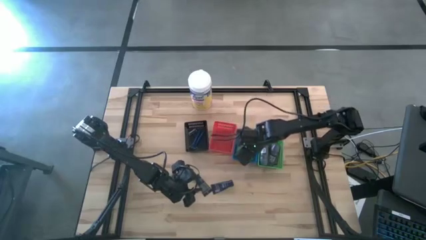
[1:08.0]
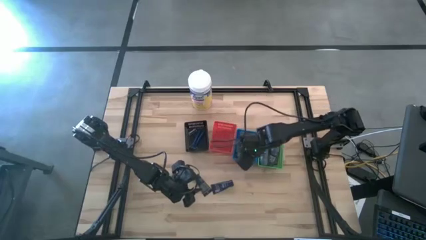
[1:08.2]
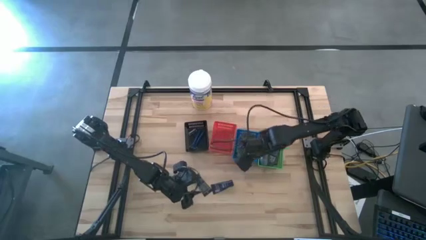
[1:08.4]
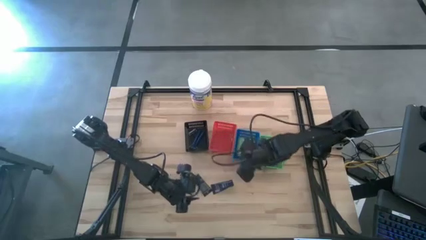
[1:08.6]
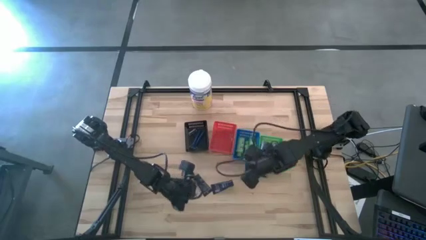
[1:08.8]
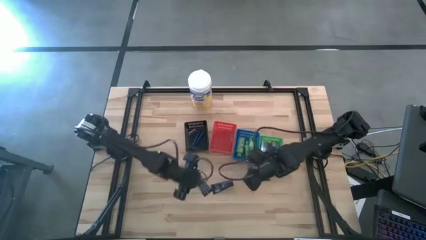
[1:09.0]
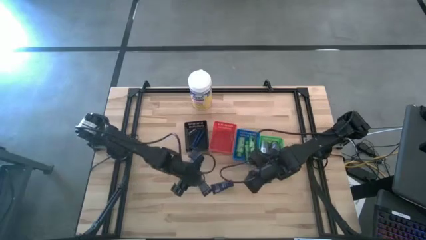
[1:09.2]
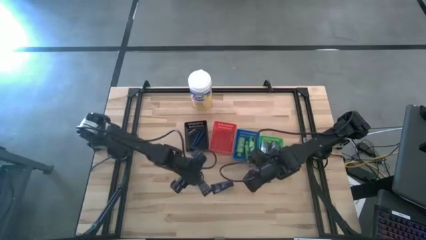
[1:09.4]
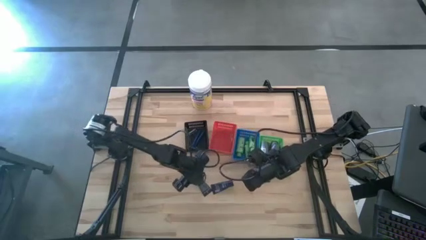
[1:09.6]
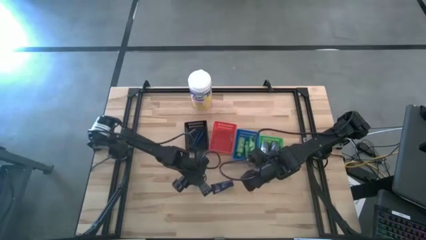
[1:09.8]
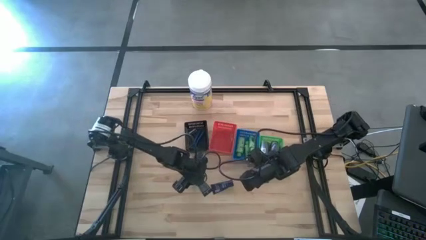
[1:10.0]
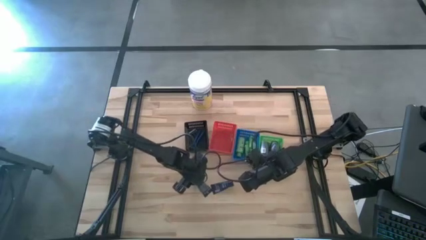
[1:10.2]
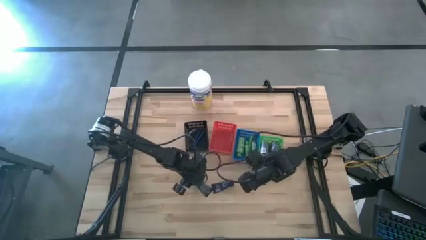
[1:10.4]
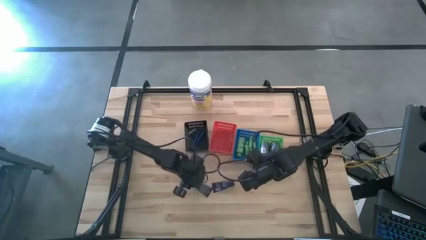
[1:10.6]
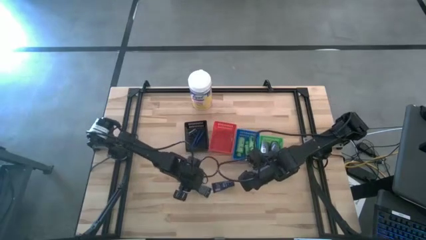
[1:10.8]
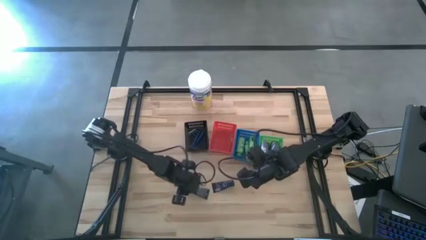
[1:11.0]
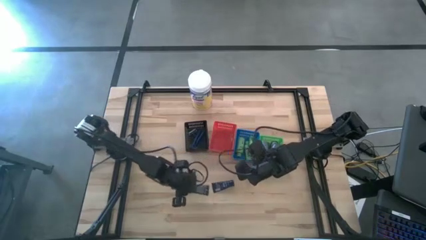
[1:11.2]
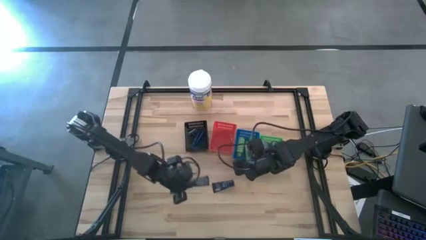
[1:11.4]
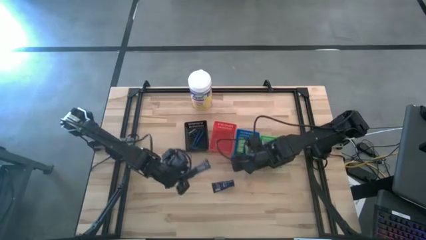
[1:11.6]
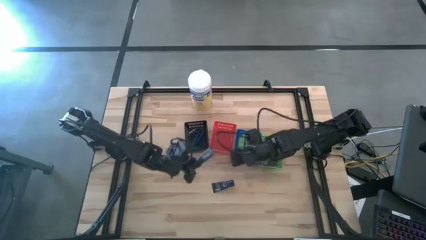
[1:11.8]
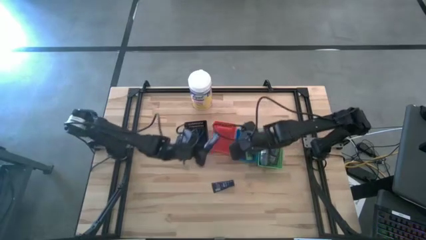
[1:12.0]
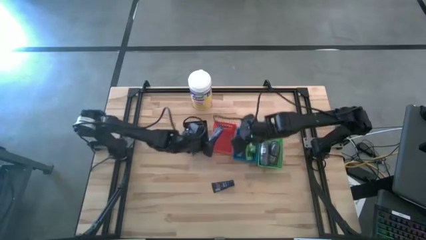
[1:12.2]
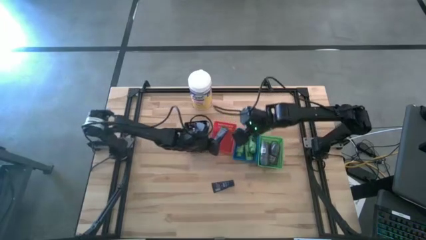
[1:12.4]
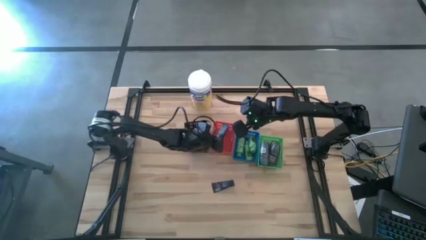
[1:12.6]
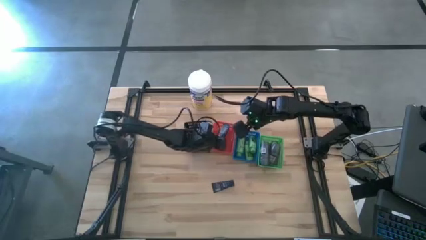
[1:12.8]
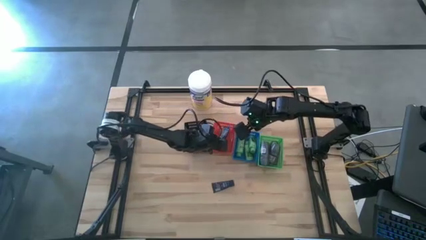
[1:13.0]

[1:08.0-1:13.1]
Task: Pick & Place Travel size toiletries
Put the blue shave cream into the red bin

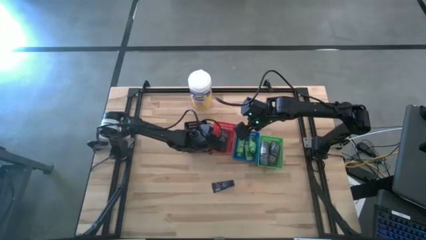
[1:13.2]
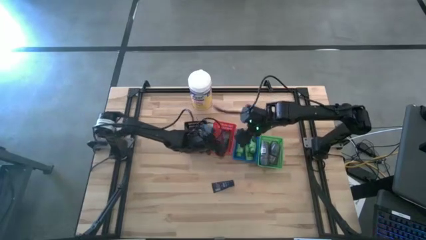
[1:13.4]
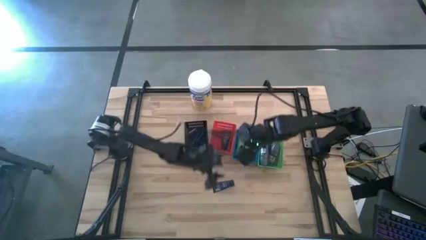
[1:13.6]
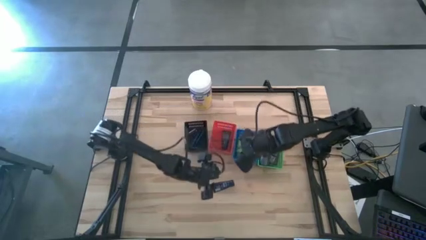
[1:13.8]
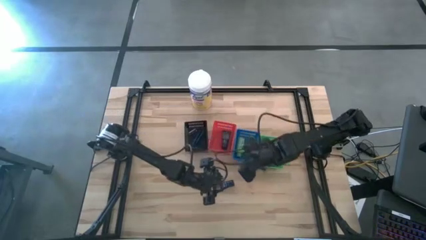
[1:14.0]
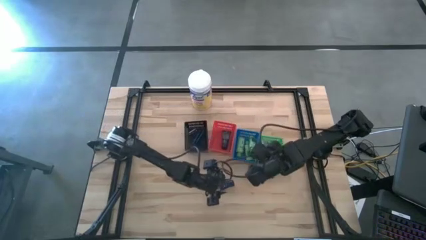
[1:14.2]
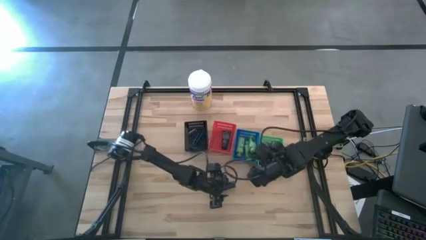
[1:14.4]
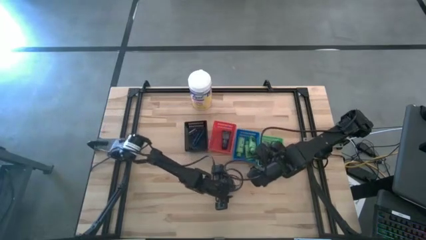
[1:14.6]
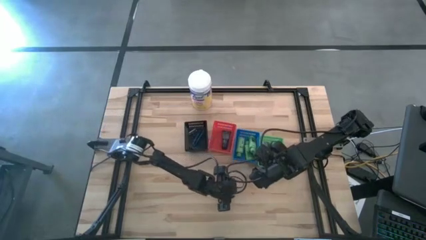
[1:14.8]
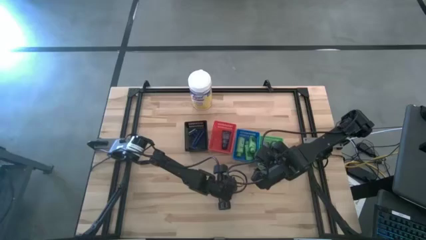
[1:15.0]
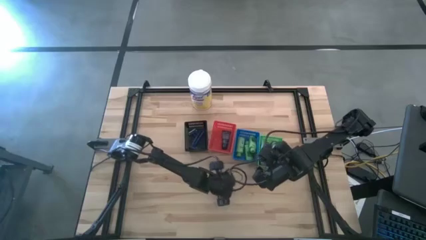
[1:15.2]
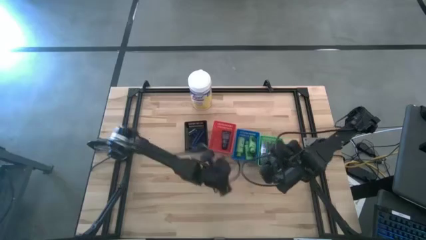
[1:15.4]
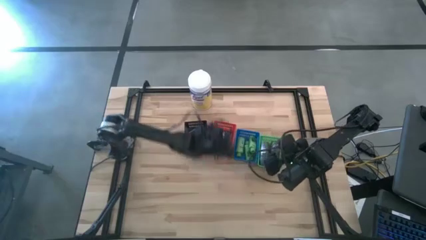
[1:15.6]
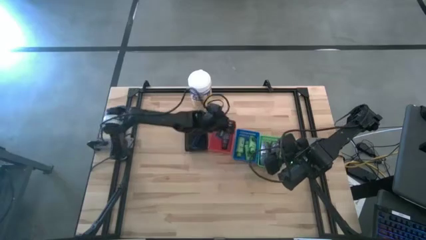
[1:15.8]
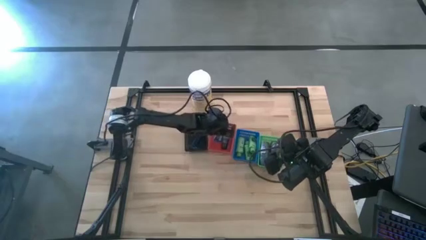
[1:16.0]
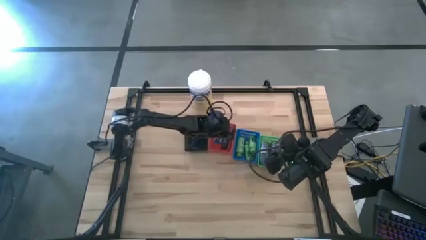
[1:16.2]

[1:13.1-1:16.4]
Put the blue shave cream into the red bin

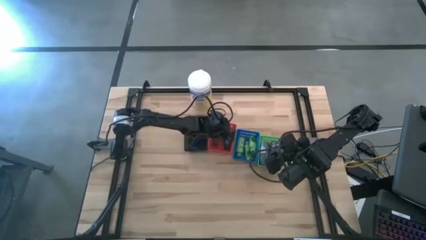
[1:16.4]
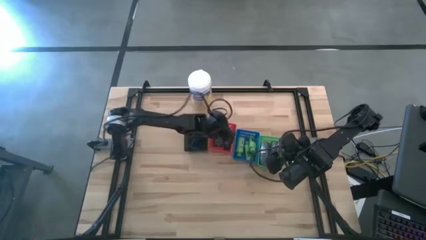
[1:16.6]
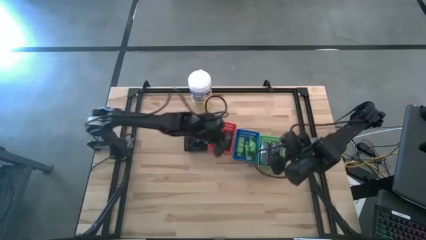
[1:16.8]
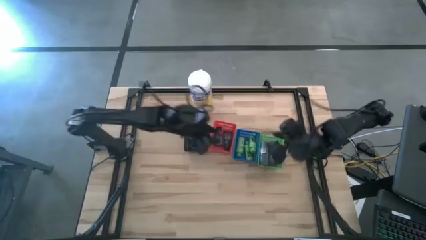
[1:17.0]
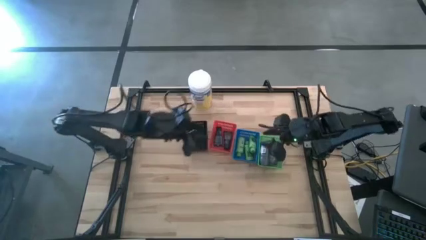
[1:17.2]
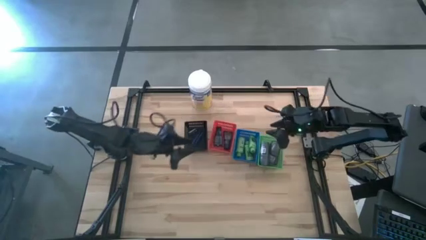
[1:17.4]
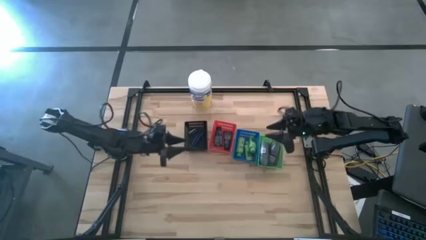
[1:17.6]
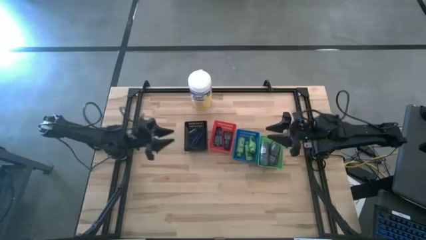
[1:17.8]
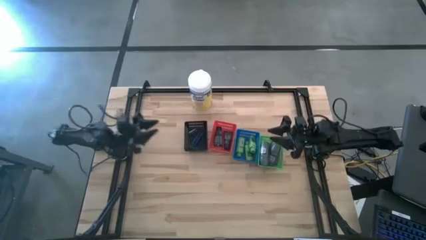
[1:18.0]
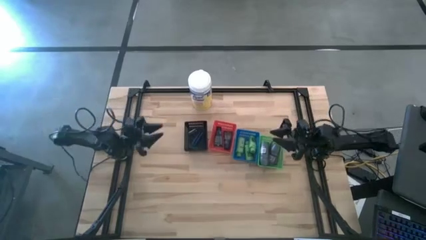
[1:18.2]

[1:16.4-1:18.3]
Return to Home Position

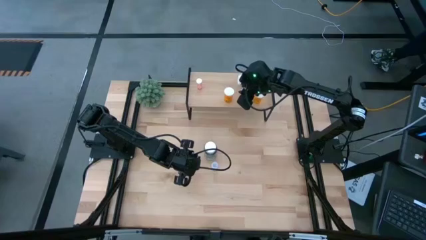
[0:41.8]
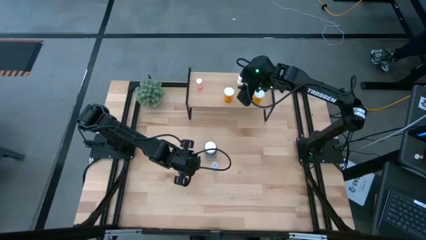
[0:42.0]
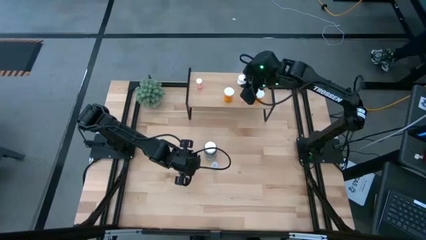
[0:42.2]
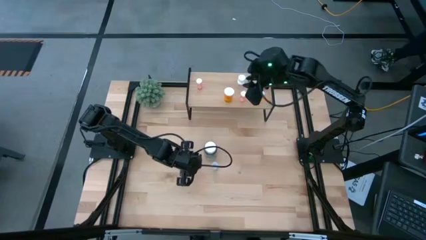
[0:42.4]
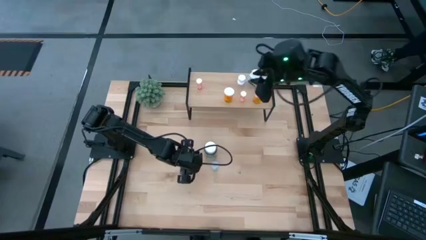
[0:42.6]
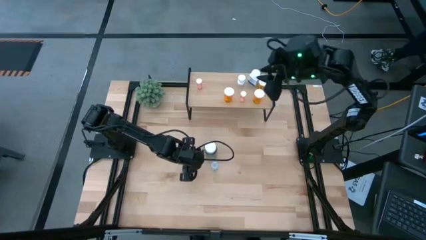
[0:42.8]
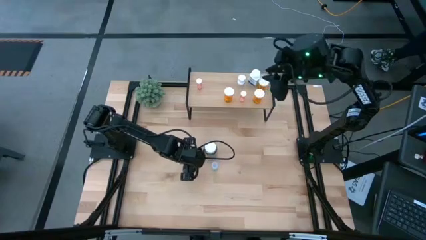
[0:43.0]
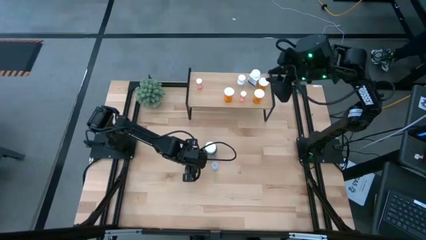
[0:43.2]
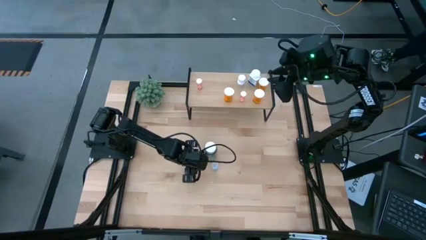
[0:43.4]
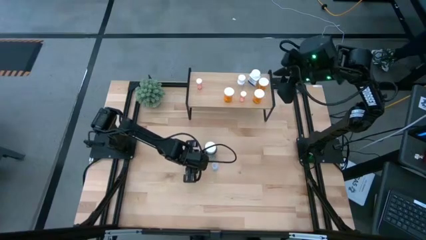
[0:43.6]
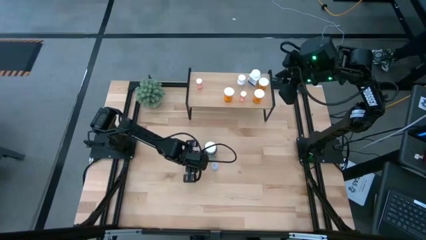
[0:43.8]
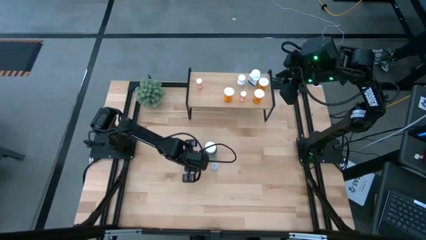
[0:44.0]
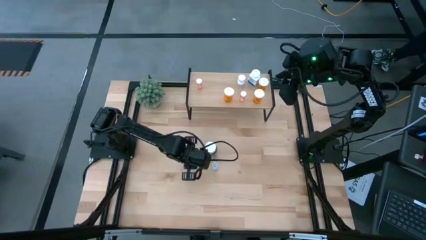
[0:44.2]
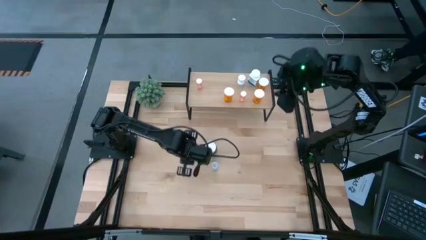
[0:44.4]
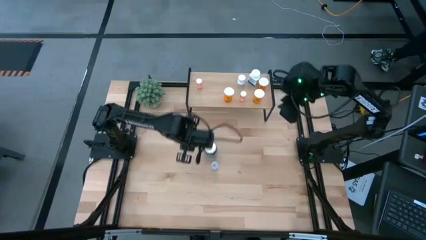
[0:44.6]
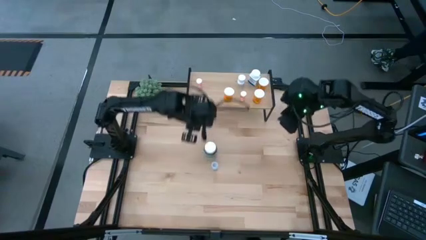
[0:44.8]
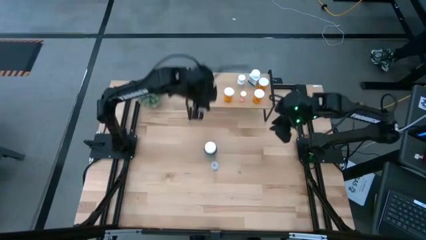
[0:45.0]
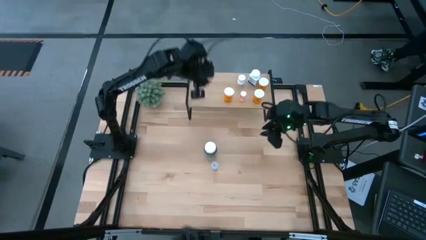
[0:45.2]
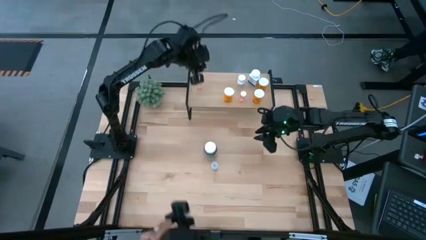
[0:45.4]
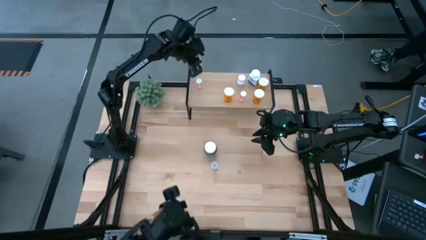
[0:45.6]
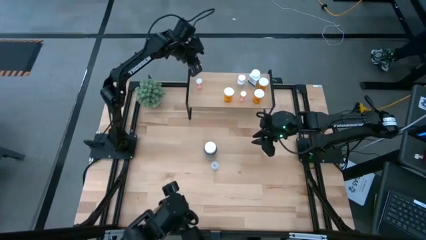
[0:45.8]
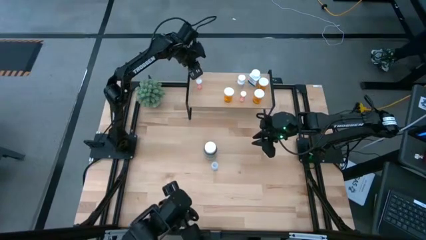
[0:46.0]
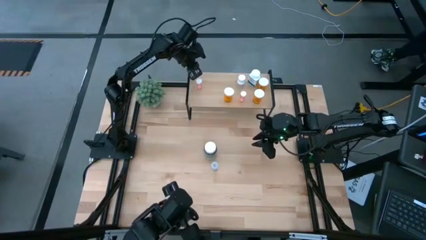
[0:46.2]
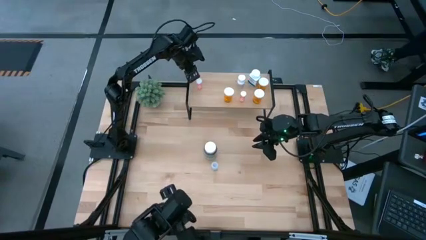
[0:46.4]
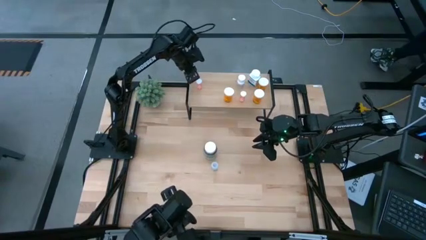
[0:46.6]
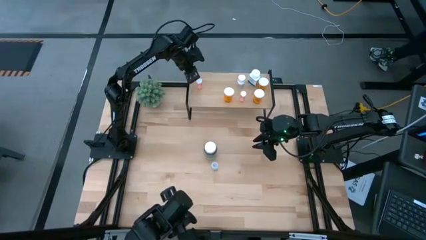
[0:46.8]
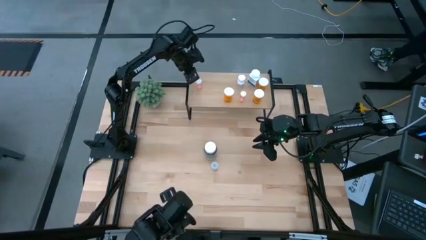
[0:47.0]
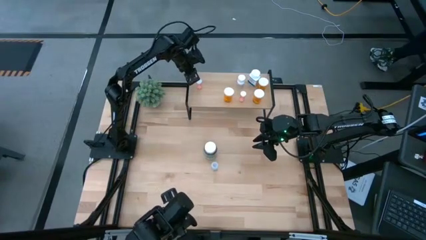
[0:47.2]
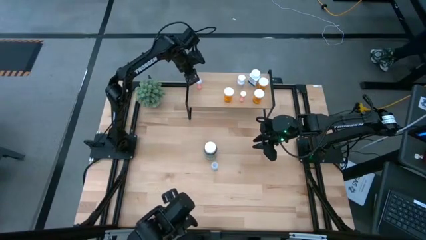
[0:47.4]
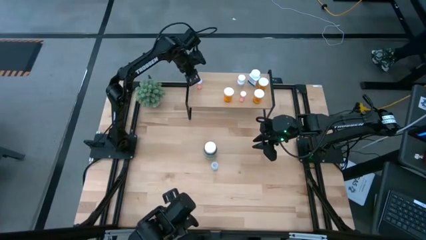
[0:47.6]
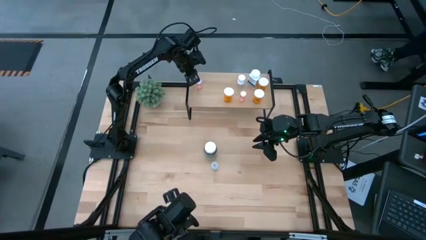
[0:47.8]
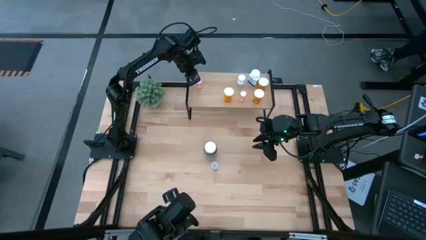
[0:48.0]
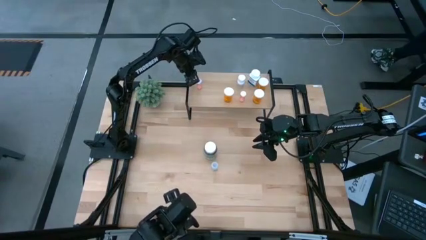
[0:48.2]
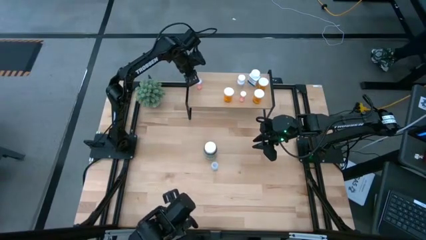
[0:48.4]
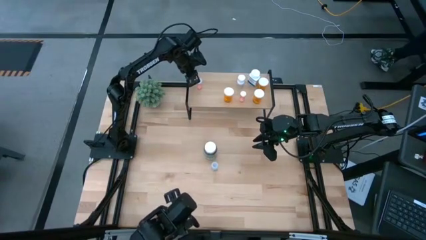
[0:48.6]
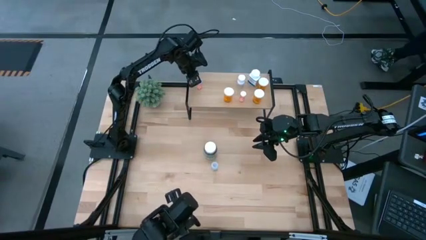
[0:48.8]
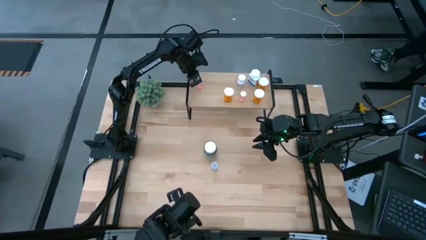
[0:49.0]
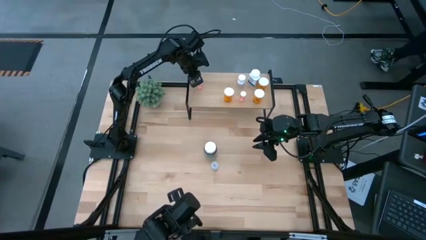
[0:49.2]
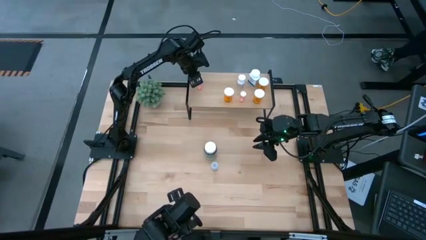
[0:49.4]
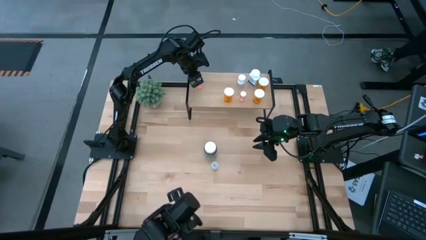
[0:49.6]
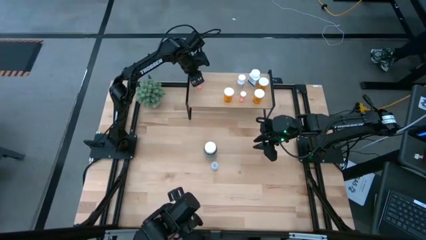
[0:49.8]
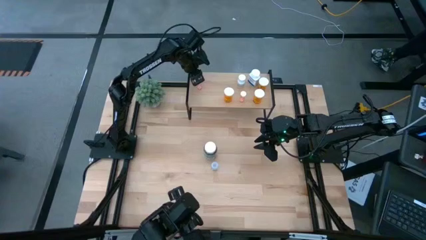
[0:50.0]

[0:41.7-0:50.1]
Task: Pick and place medicine bottles onto shelf by color
Put the pink pill bottle on the shelf aligned with the other pink pill bottle
